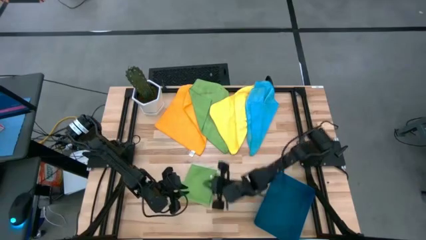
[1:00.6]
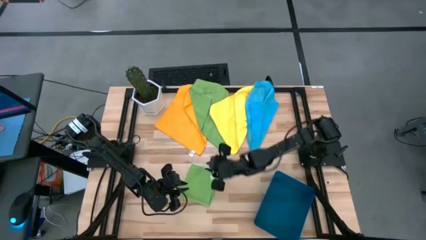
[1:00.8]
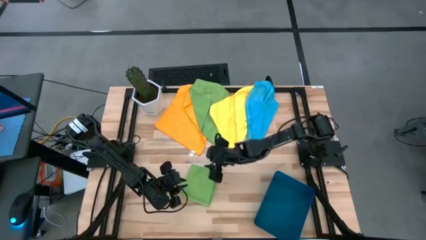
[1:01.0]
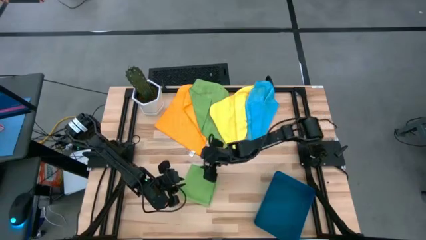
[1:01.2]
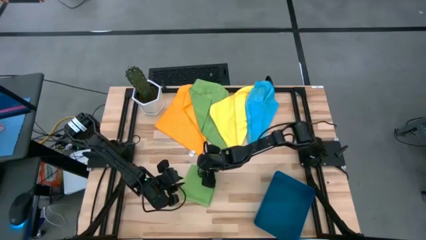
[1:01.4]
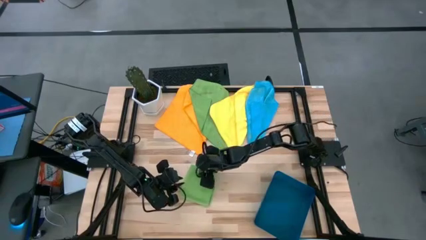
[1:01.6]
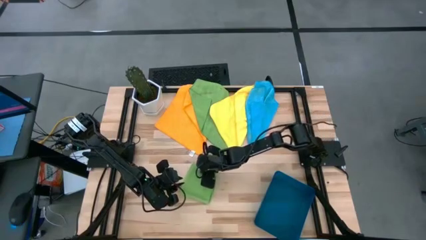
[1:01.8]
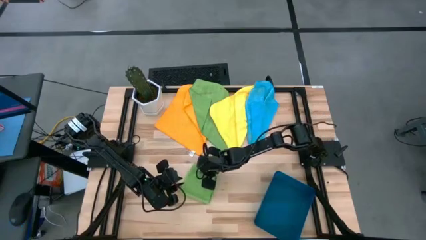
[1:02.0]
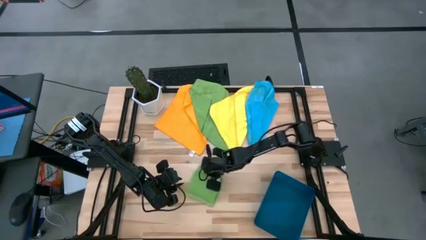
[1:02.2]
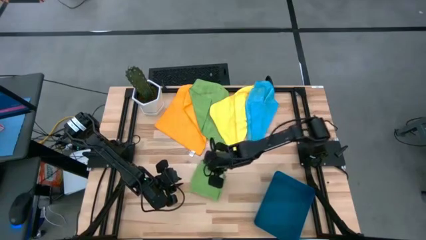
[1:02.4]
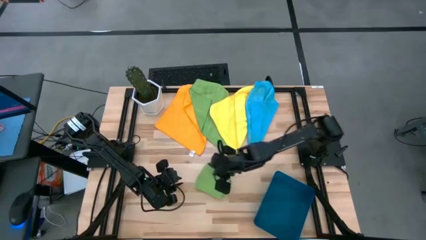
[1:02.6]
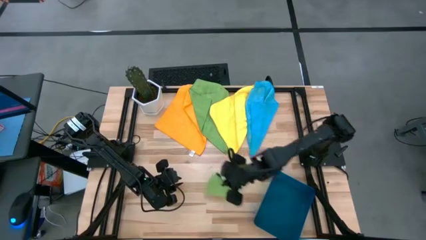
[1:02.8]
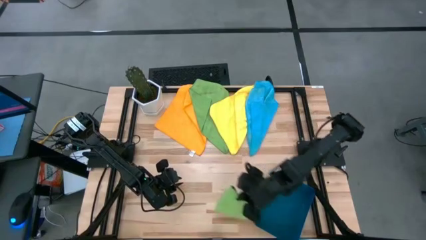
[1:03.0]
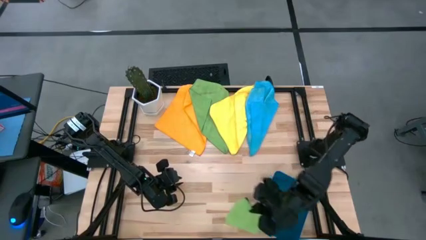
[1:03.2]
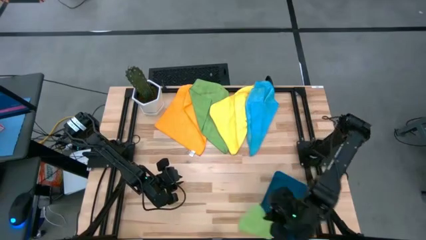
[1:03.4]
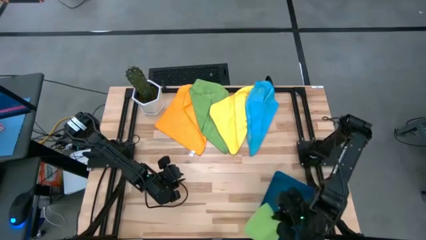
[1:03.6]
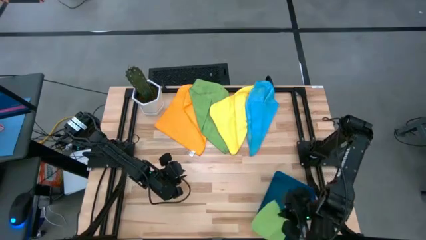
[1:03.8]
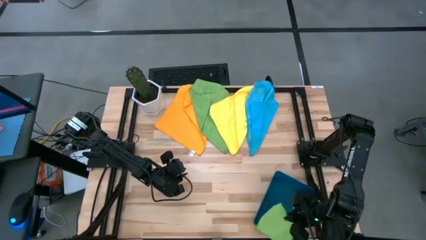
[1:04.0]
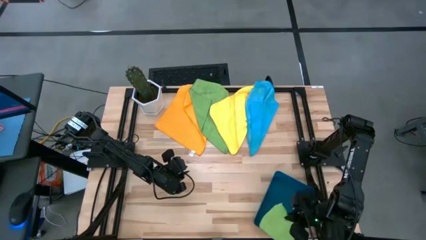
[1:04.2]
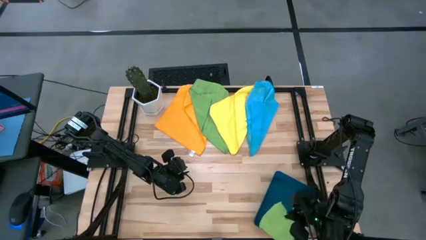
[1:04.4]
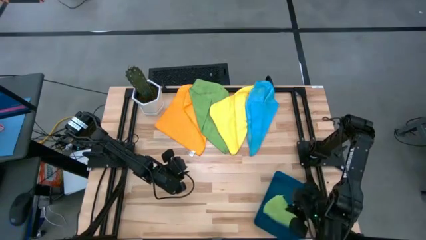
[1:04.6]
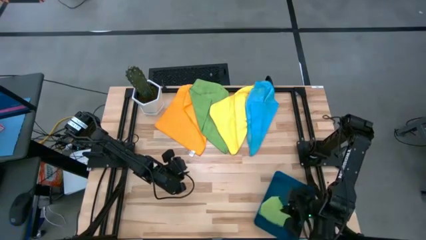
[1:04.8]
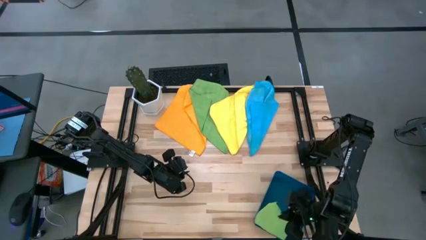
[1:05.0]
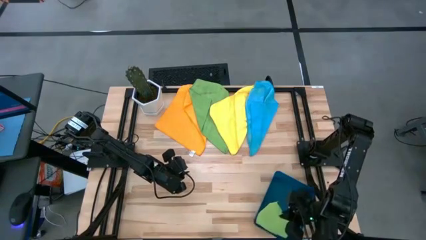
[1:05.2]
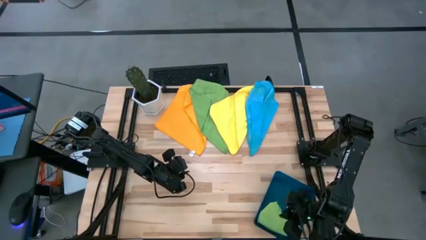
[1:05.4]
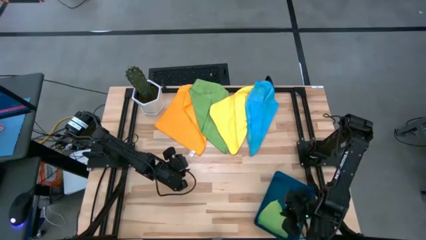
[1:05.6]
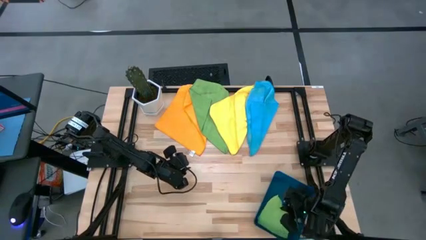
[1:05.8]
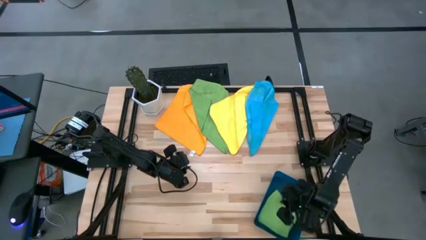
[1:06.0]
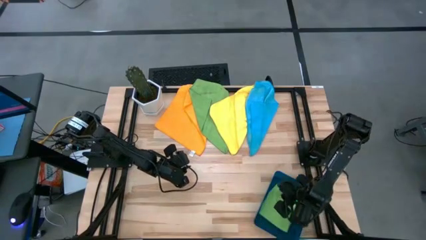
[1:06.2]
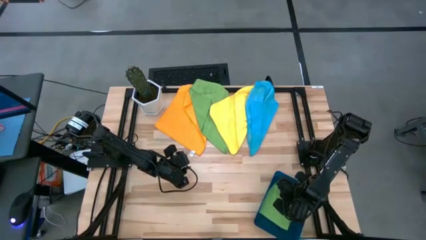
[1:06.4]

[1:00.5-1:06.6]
Task: Fold microfiber towels
Put the folded green microfiber towel into the blue bin

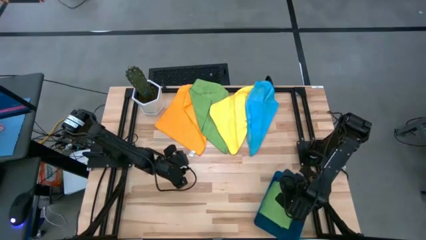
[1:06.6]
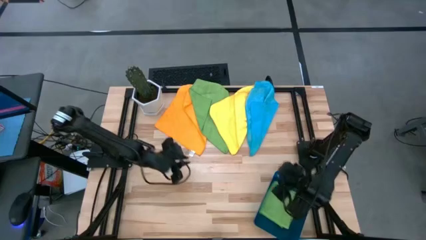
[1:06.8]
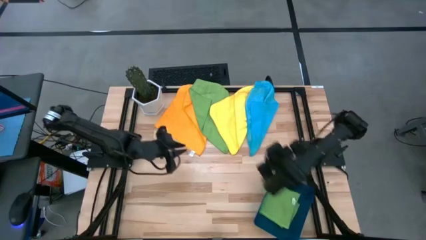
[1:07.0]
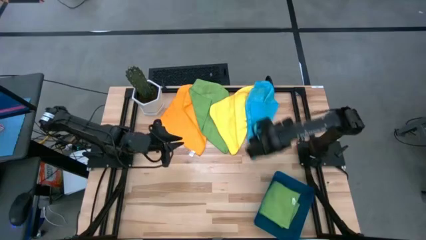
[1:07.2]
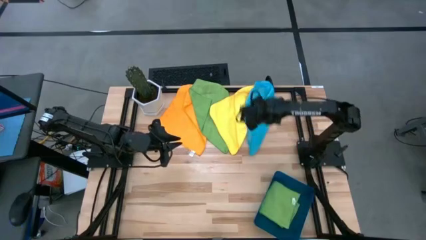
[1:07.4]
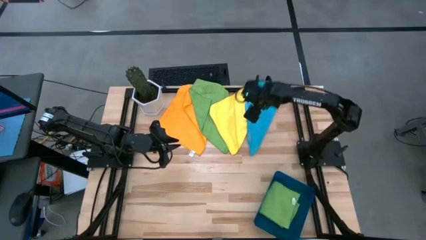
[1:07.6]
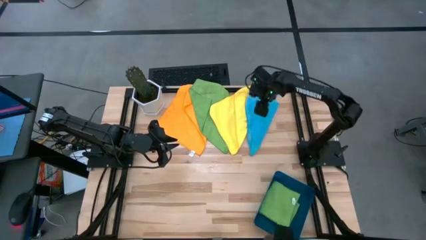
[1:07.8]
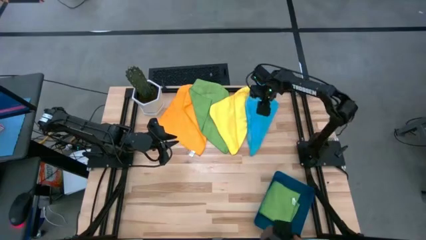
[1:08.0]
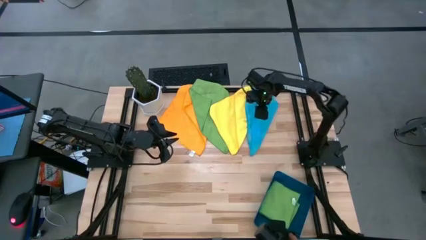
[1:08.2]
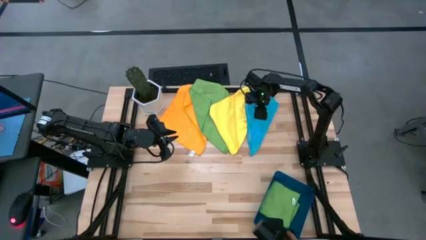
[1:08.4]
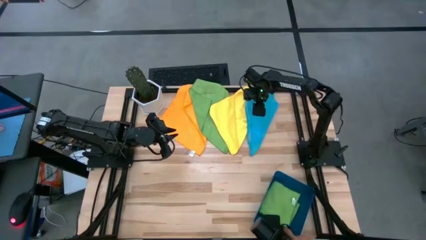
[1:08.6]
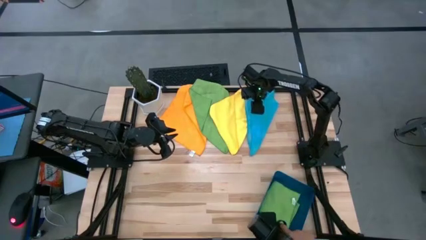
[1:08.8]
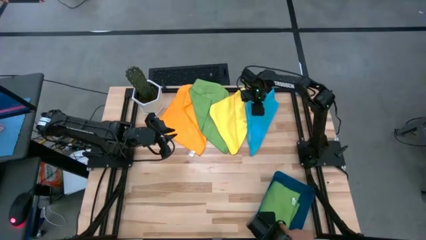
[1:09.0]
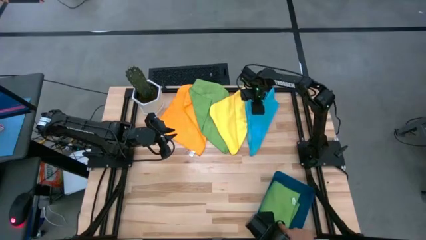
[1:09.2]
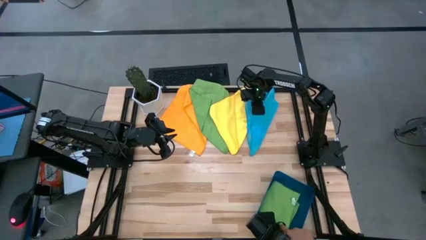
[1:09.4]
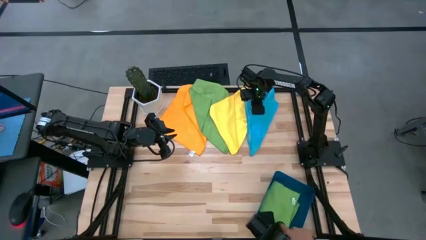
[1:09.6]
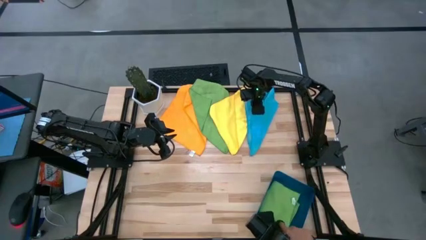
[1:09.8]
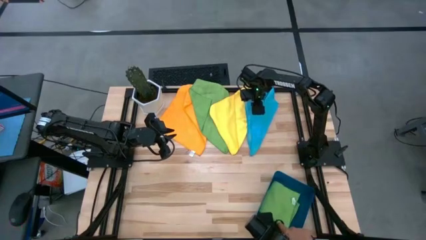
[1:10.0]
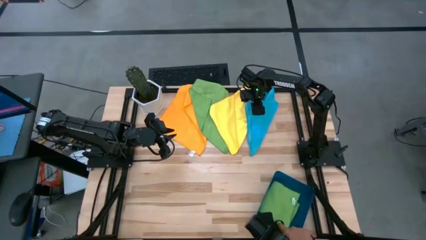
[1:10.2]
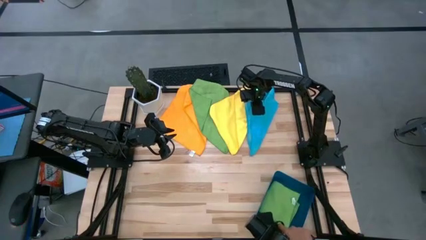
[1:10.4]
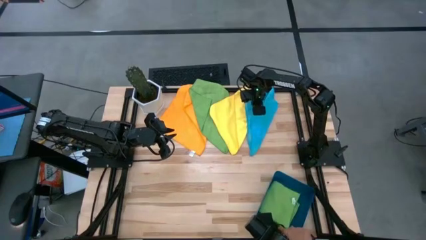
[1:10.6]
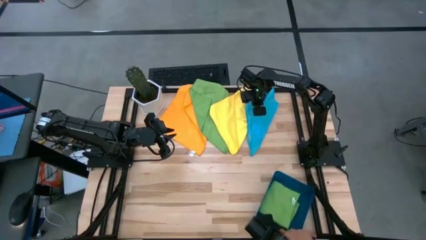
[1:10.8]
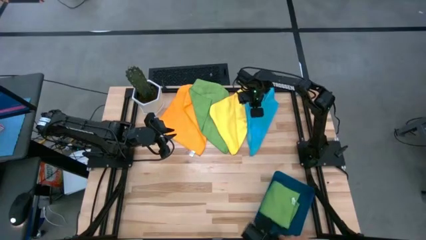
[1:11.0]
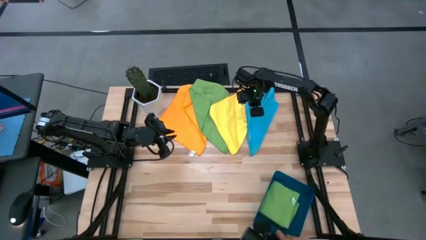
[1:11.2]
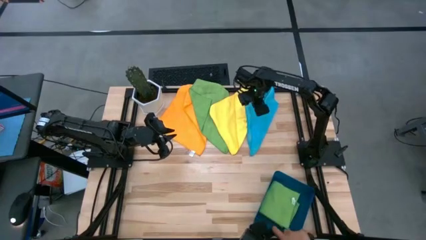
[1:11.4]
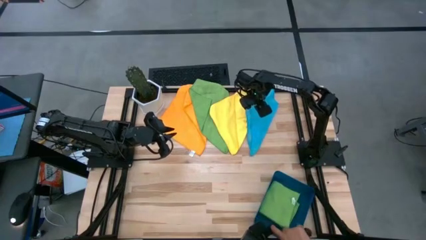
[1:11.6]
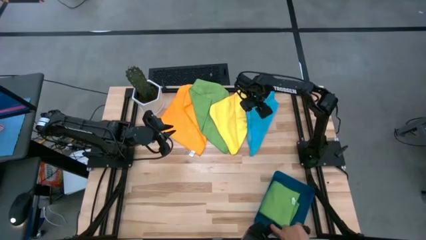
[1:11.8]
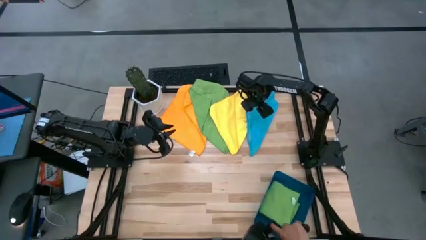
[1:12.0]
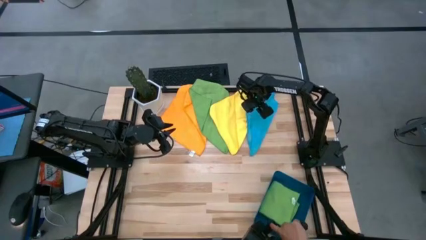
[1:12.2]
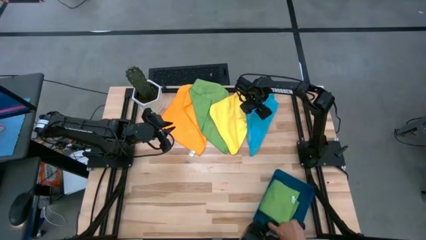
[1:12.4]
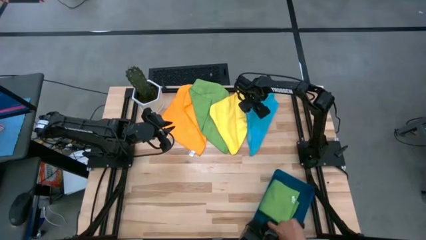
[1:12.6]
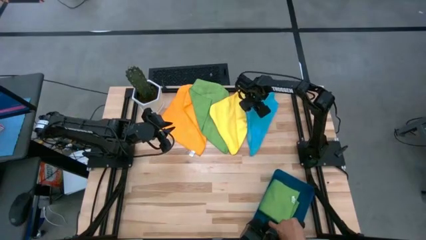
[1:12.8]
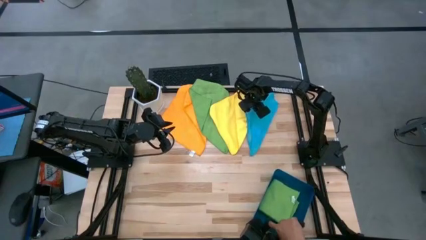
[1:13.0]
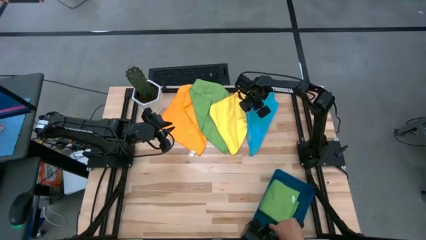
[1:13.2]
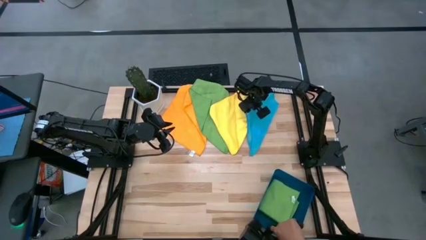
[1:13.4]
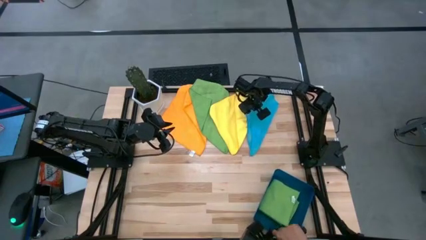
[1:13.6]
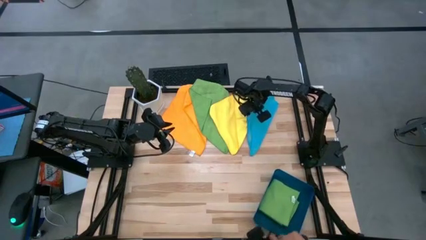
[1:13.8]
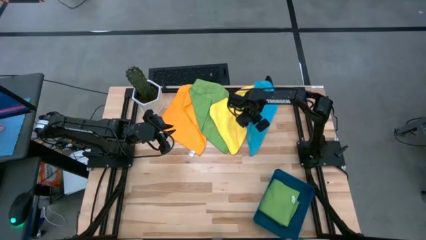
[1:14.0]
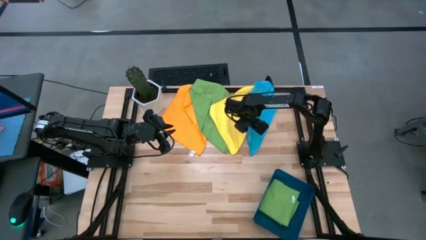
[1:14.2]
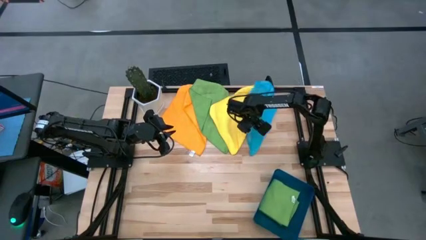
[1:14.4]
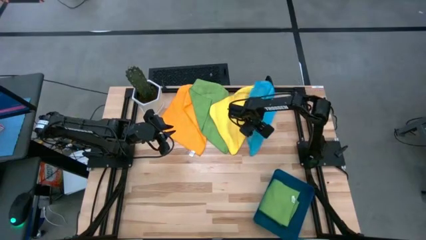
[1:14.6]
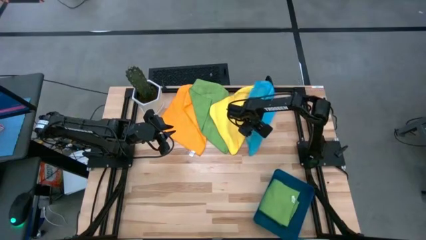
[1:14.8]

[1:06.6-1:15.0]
Fold the blue microfiber towel

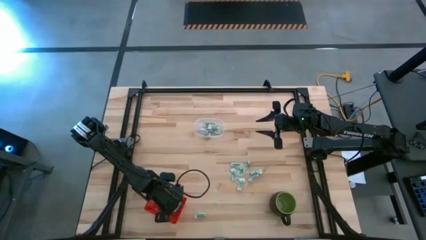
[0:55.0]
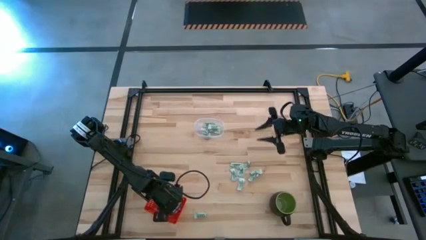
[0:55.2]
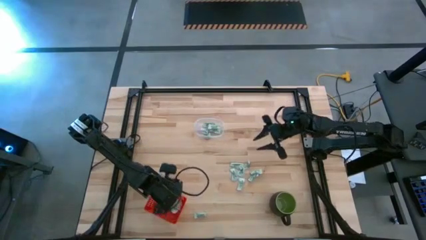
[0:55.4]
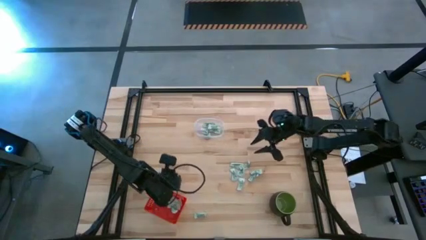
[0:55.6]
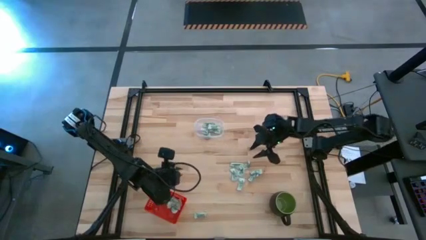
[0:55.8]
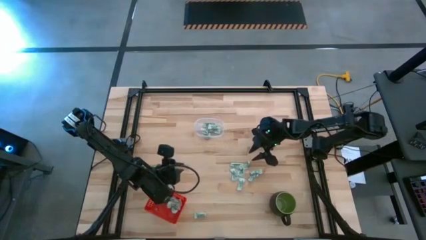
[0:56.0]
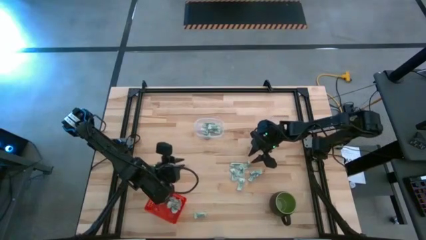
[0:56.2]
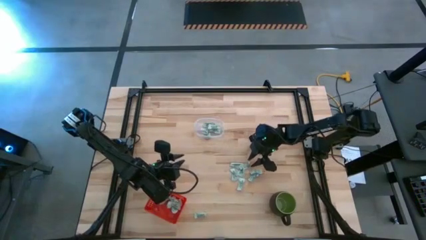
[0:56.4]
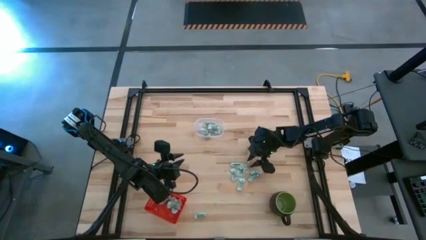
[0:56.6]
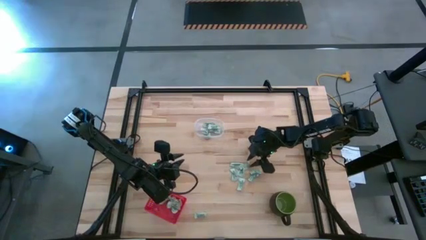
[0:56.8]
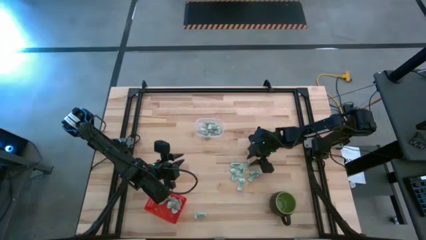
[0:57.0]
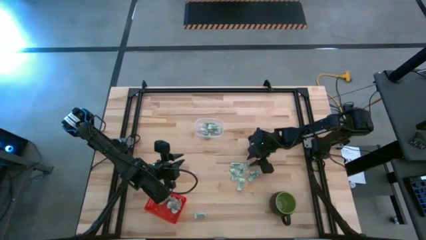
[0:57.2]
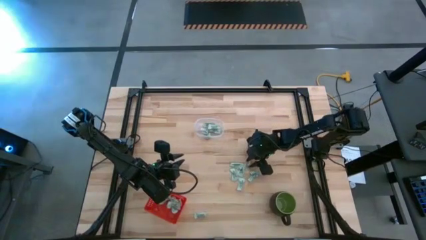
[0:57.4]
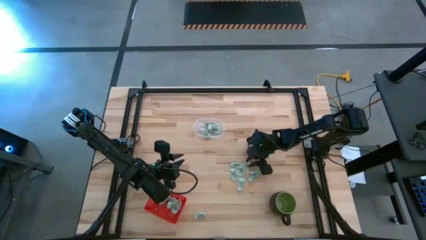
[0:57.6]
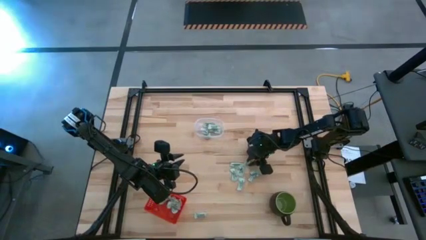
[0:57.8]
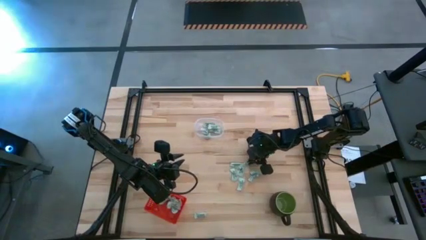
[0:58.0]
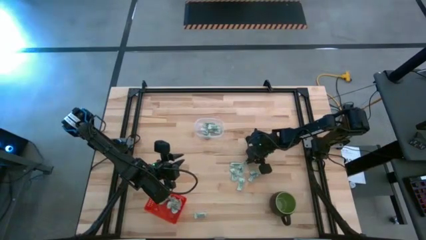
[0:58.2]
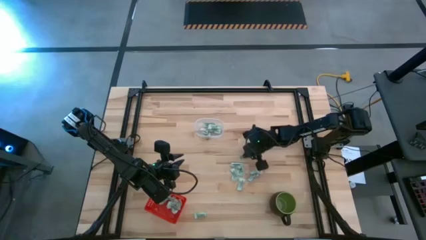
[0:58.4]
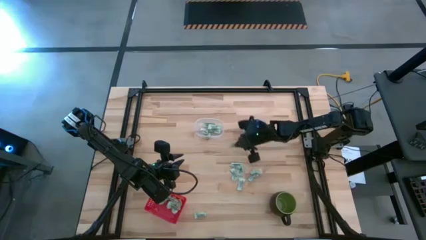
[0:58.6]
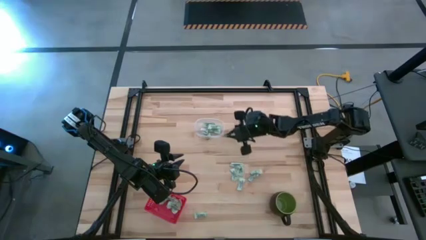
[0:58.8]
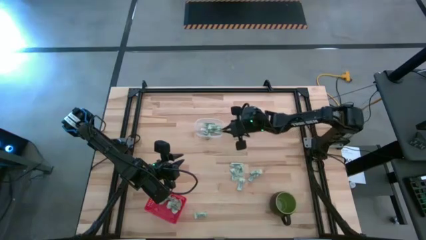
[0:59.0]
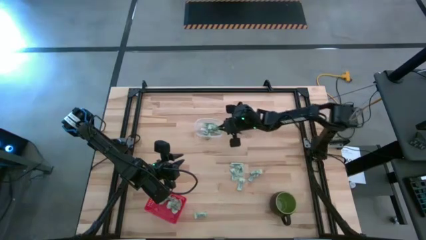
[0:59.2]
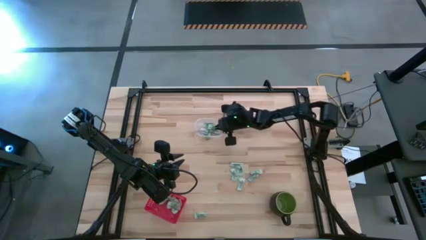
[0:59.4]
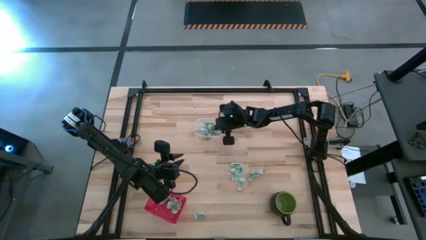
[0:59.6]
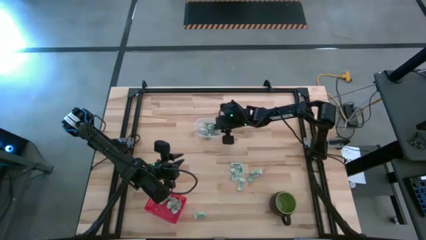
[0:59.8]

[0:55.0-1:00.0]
Task: Pick and place items into bin
Put the stevia packet into the transparent bin
